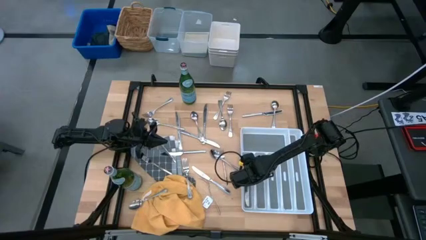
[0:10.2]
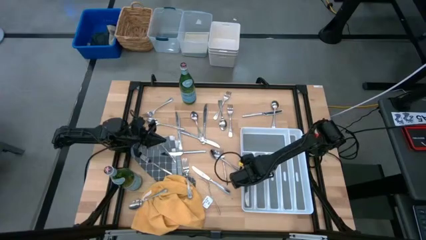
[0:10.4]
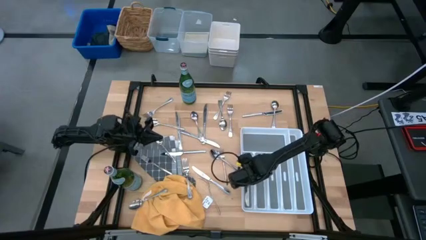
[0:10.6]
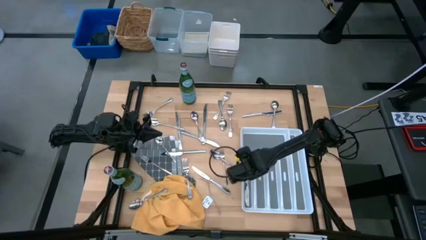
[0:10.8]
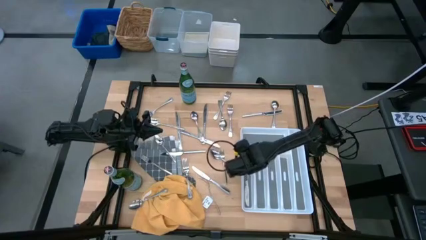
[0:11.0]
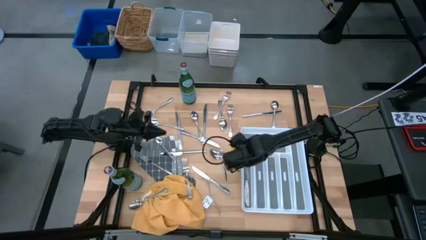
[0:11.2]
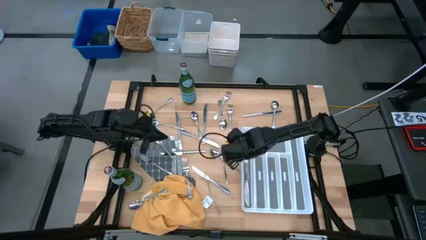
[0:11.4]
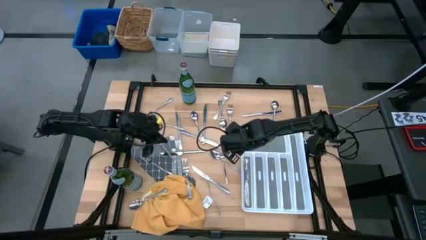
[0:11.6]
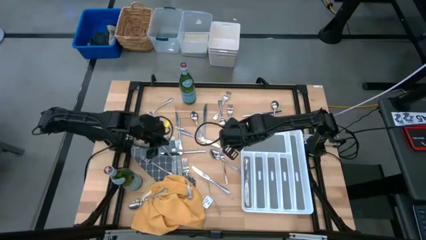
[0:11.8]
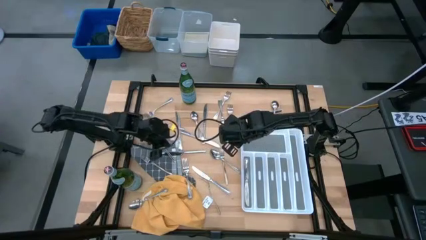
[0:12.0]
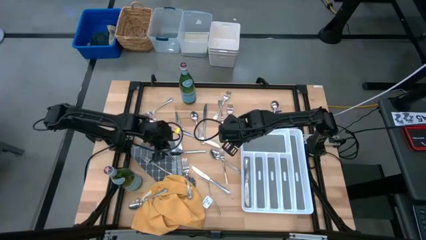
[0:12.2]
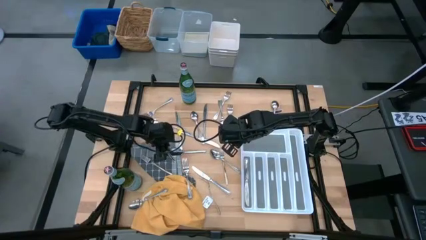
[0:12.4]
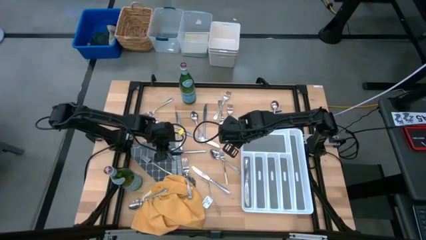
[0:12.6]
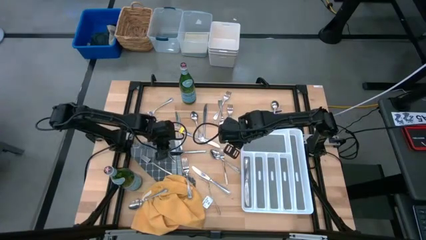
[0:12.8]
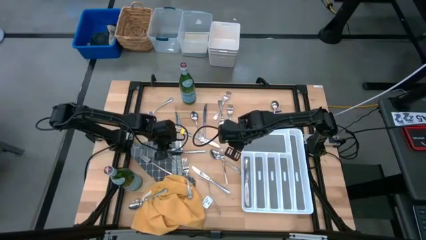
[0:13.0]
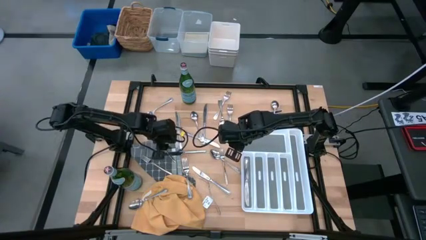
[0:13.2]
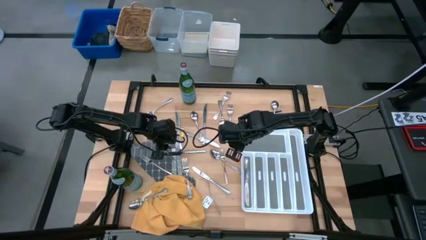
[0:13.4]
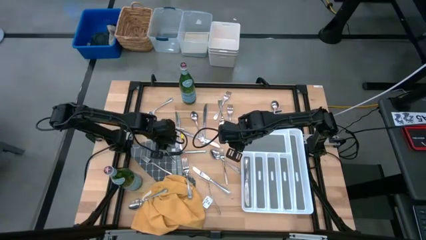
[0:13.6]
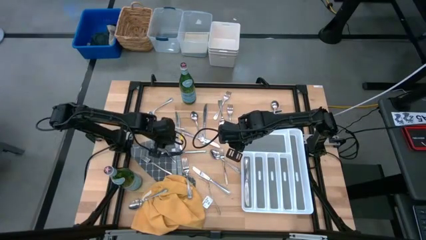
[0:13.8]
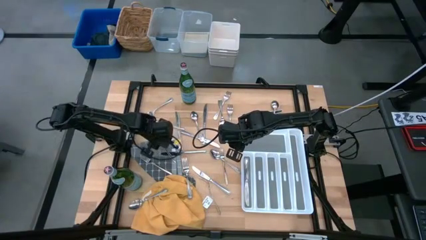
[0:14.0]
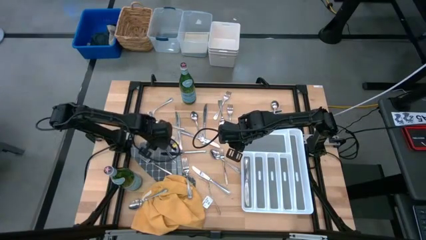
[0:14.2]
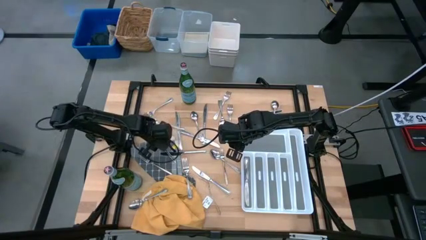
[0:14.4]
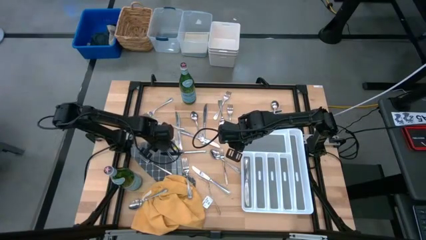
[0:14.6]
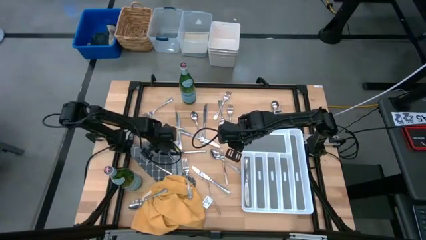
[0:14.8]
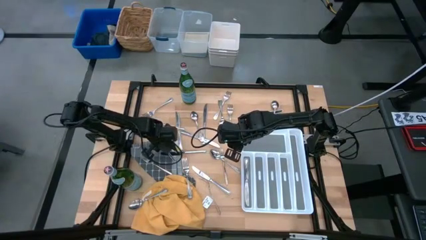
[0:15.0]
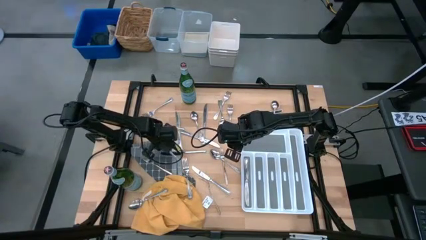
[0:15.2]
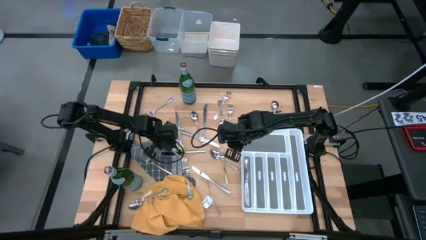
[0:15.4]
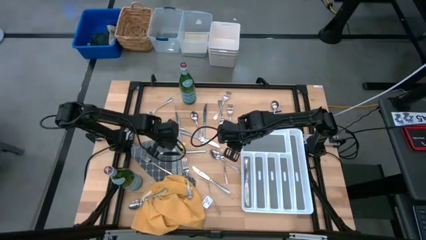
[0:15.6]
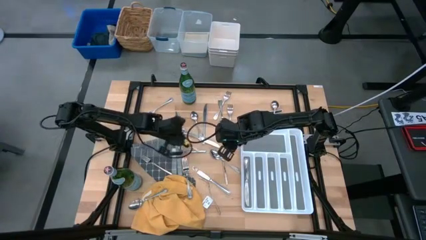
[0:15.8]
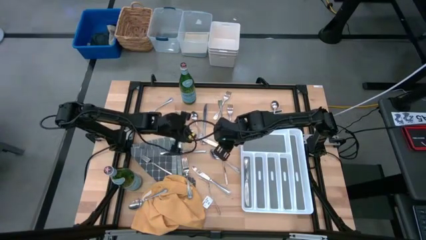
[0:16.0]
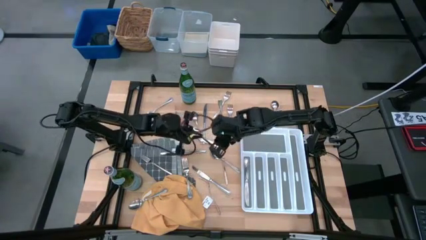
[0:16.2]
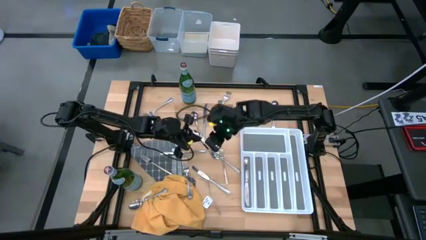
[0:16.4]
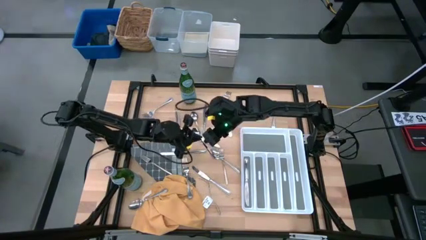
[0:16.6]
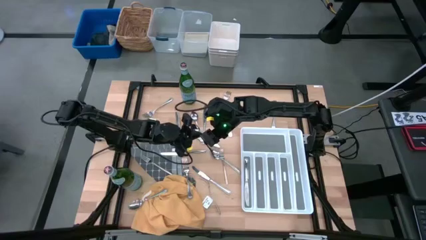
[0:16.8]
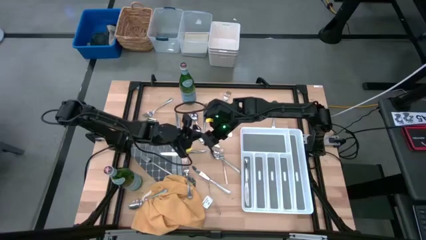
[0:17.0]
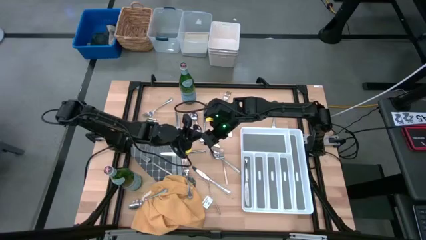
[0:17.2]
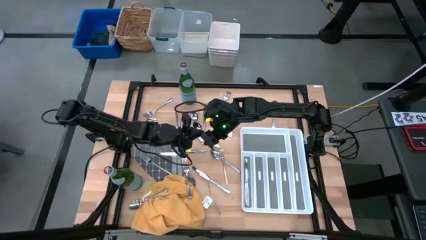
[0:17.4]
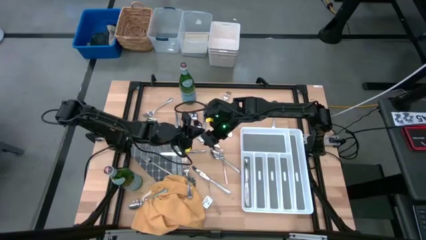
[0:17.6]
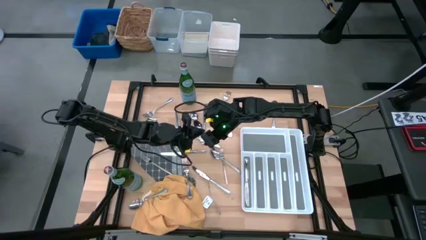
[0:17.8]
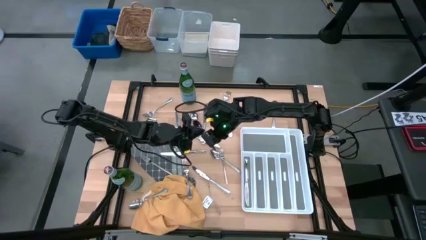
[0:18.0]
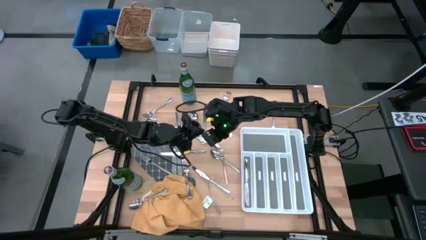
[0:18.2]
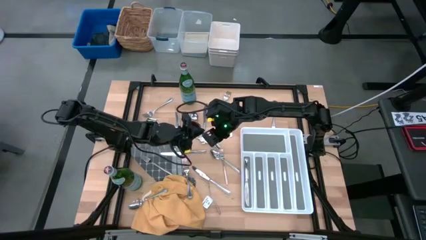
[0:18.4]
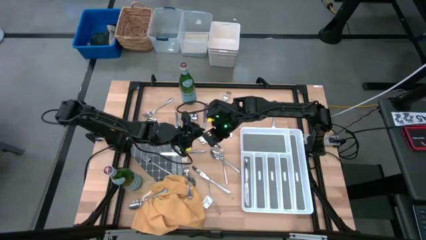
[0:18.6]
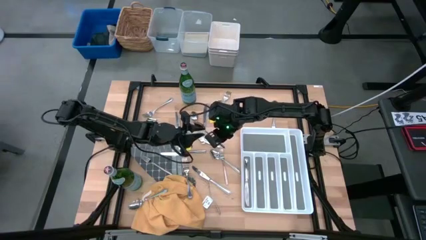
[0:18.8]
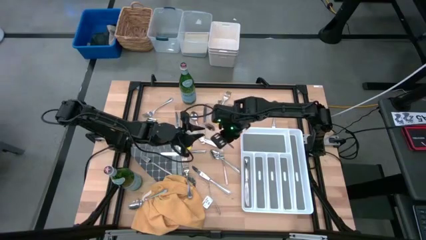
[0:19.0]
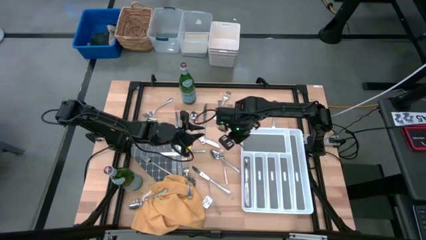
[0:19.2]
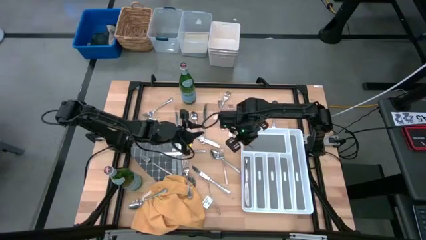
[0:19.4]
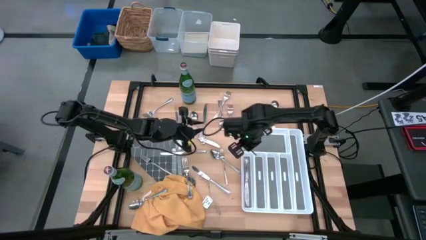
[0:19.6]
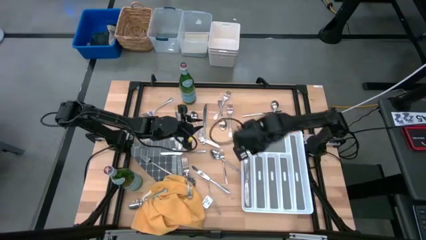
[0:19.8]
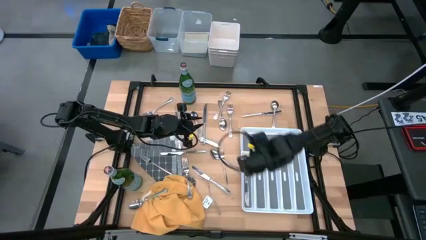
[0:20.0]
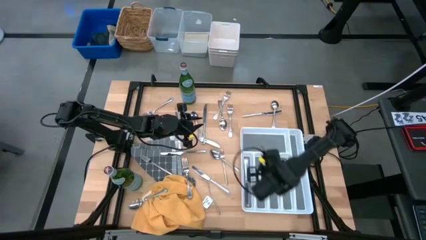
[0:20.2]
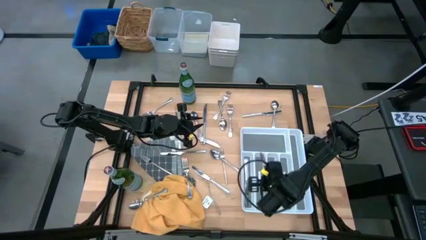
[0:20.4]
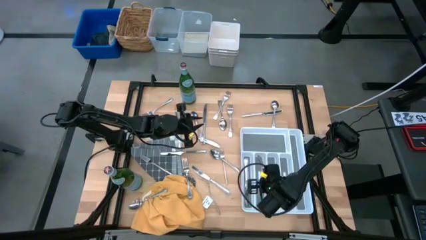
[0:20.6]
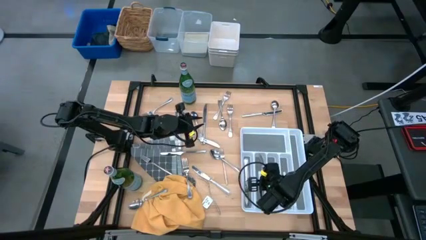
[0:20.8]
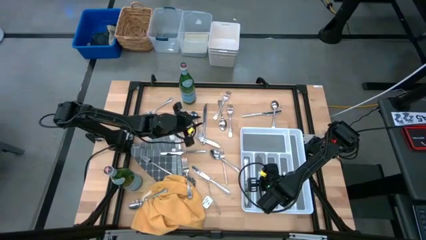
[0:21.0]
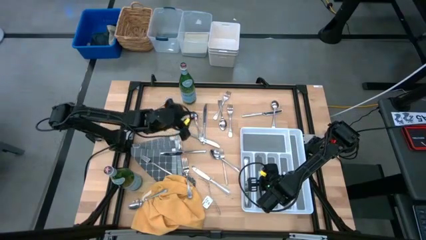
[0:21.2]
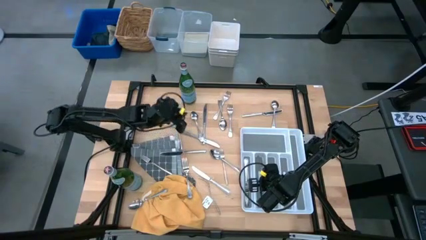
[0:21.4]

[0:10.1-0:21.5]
Put the silver spoon into the white utensil tray

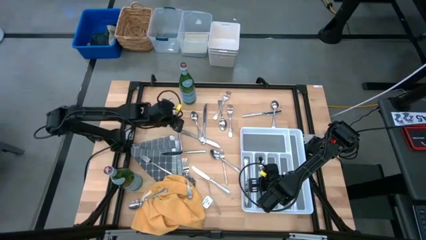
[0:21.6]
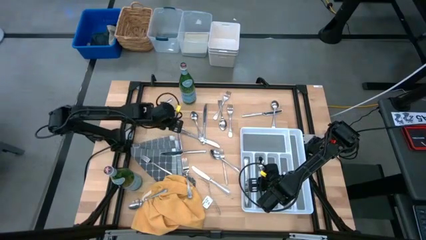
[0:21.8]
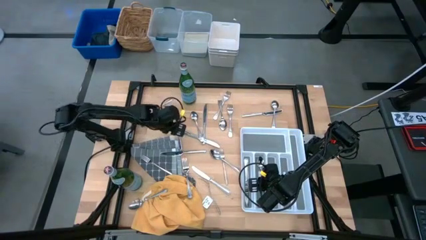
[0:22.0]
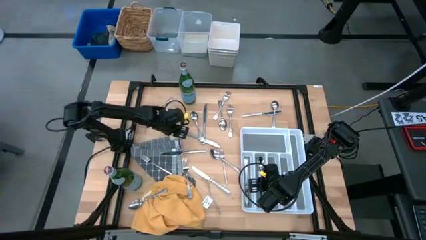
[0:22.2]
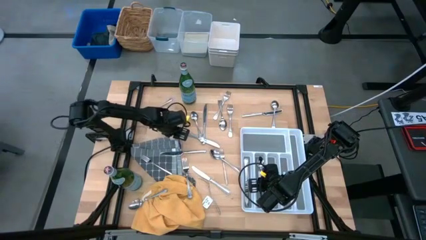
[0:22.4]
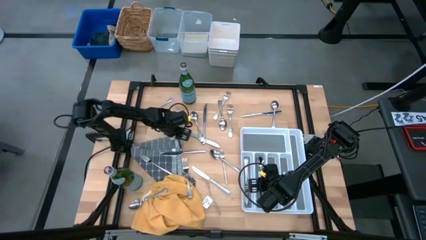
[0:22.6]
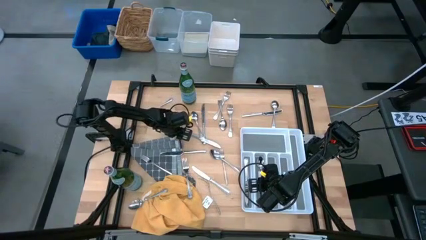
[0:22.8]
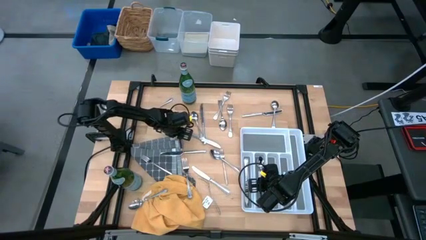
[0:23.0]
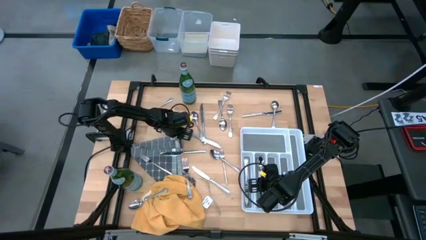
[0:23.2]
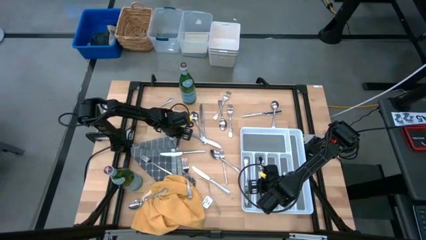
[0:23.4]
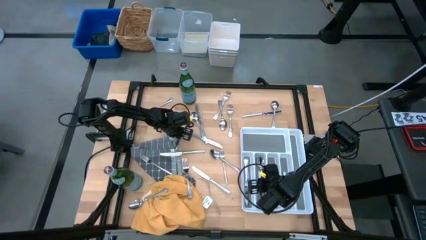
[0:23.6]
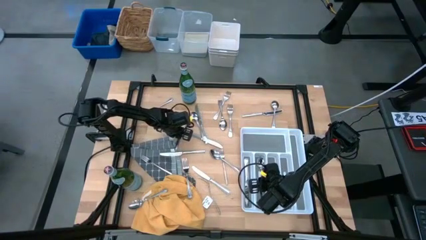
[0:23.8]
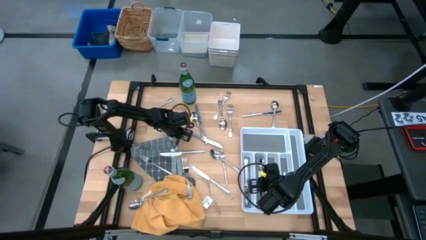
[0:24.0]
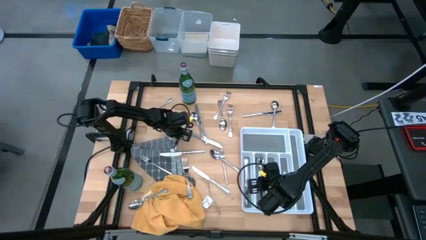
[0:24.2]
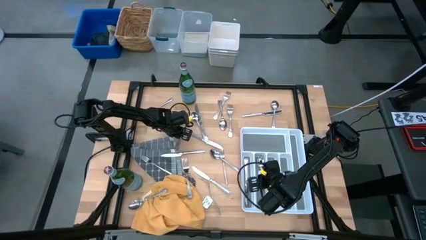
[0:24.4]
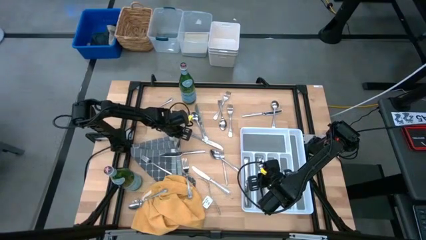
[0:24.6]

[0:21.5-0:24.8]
Stack the silver knife into the white utensil tray with the other silver knife
